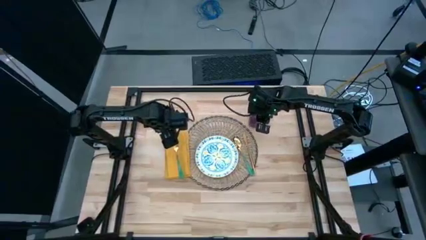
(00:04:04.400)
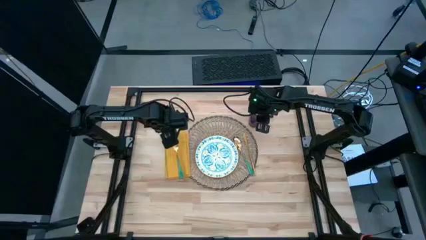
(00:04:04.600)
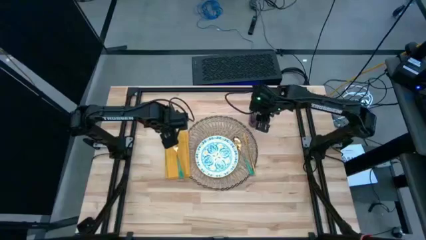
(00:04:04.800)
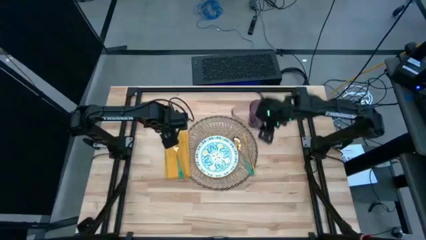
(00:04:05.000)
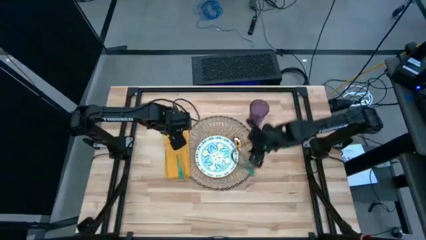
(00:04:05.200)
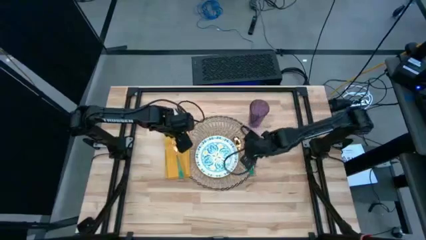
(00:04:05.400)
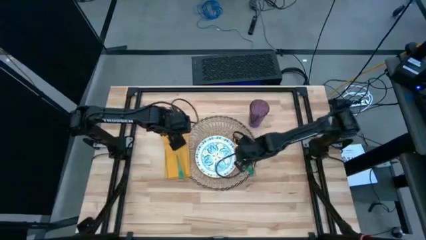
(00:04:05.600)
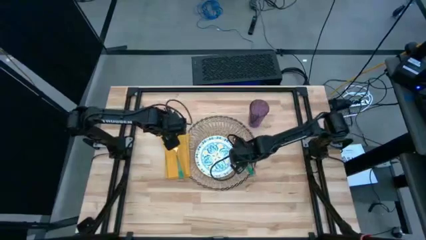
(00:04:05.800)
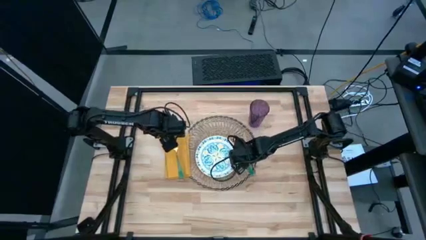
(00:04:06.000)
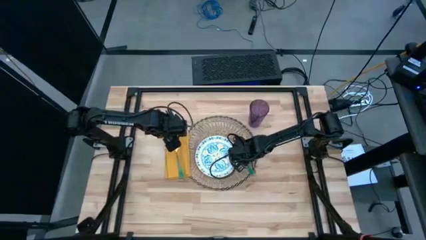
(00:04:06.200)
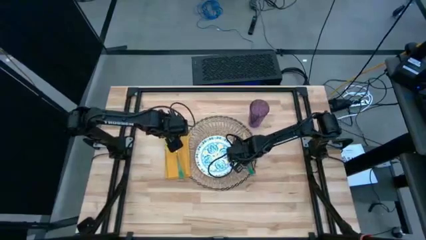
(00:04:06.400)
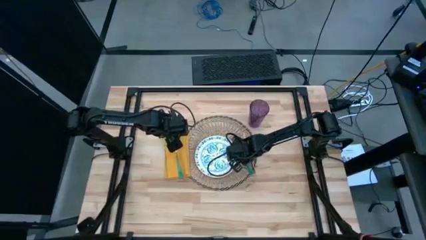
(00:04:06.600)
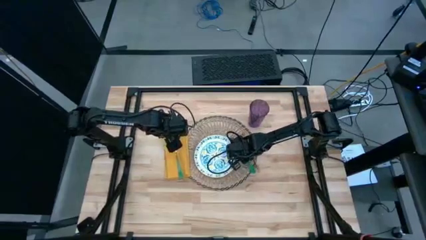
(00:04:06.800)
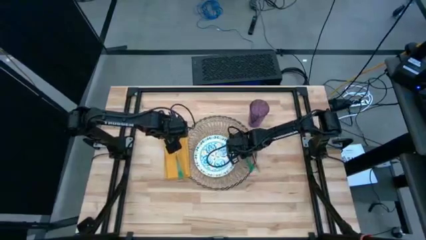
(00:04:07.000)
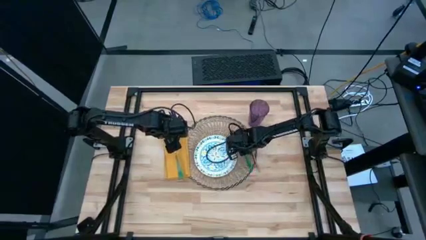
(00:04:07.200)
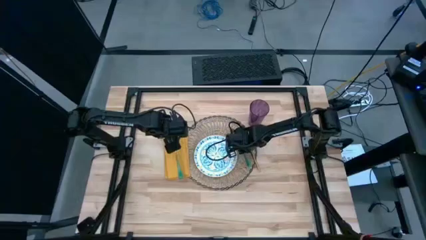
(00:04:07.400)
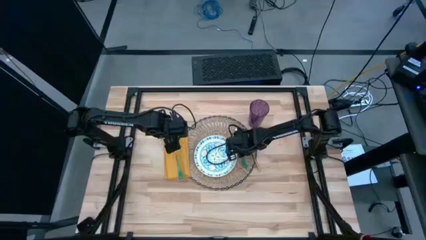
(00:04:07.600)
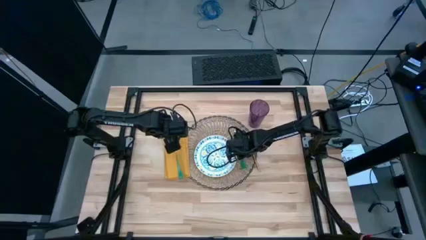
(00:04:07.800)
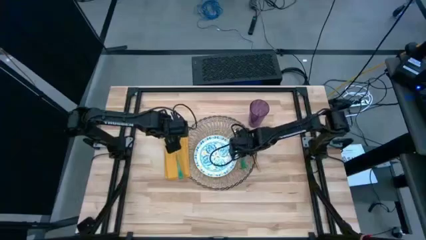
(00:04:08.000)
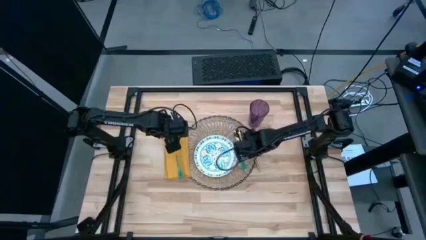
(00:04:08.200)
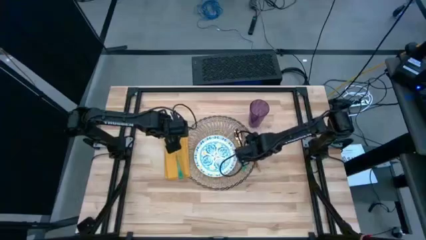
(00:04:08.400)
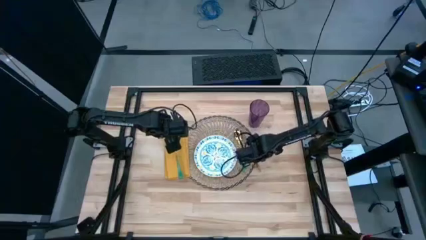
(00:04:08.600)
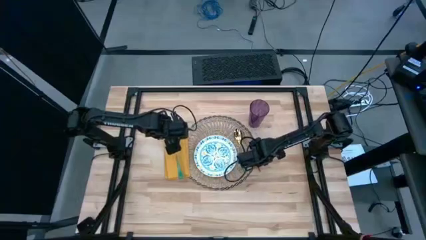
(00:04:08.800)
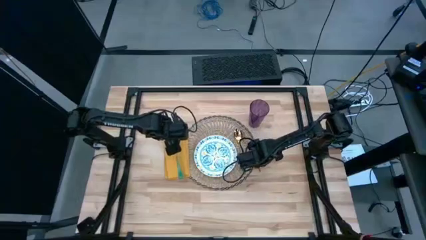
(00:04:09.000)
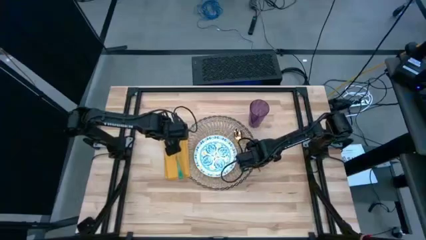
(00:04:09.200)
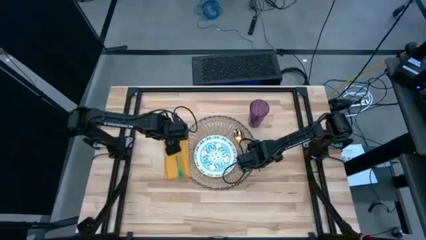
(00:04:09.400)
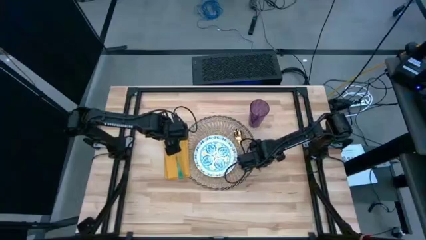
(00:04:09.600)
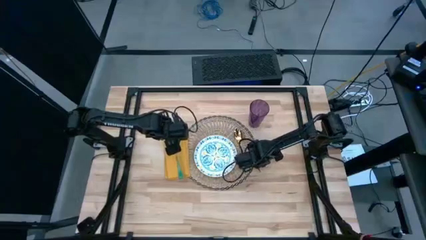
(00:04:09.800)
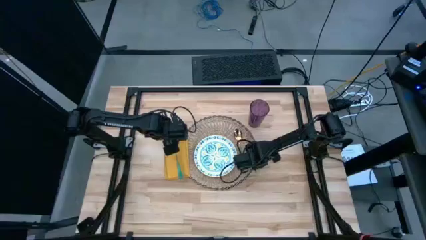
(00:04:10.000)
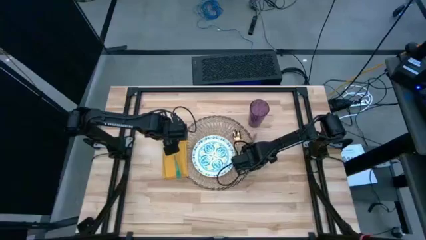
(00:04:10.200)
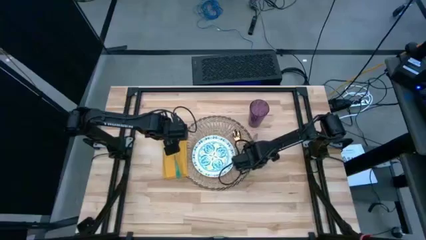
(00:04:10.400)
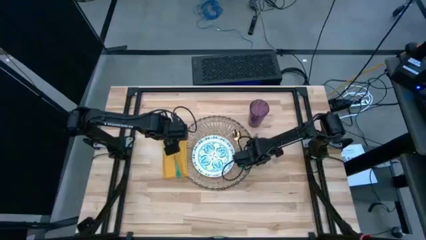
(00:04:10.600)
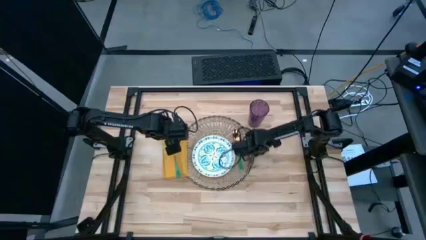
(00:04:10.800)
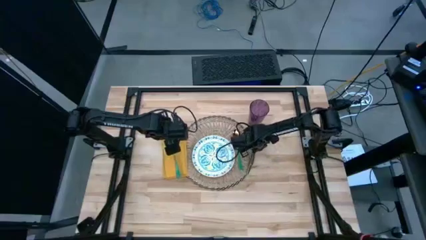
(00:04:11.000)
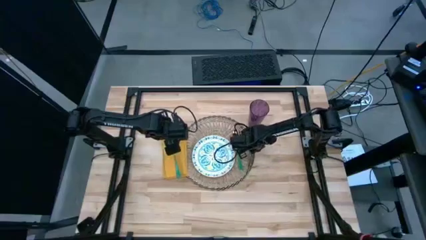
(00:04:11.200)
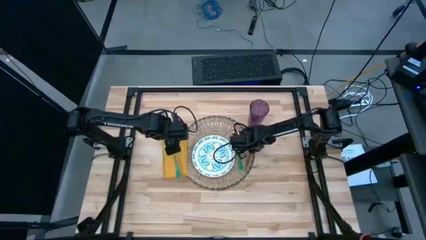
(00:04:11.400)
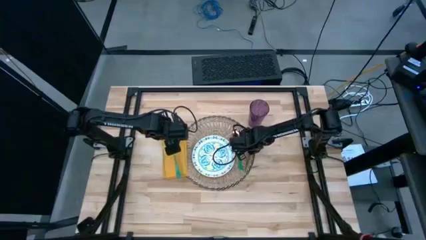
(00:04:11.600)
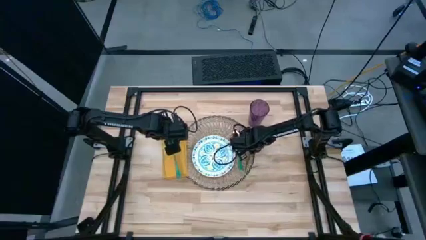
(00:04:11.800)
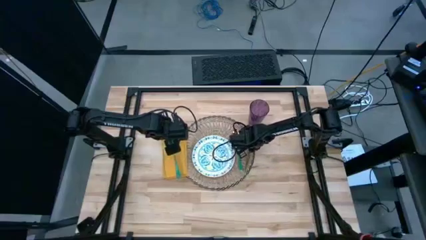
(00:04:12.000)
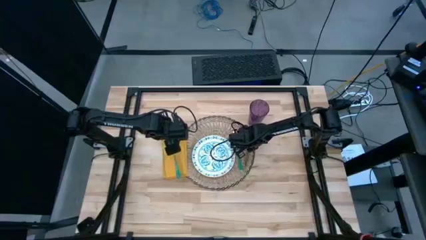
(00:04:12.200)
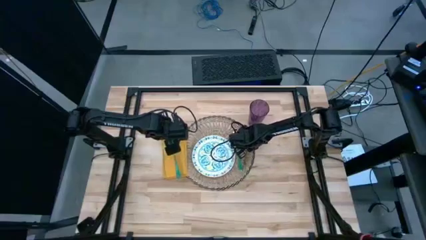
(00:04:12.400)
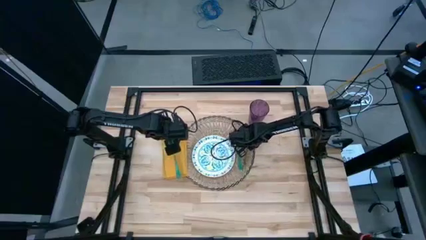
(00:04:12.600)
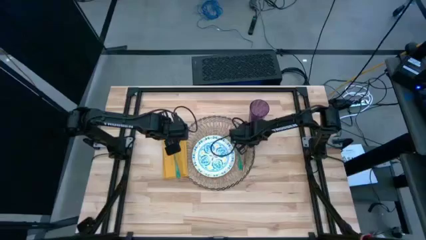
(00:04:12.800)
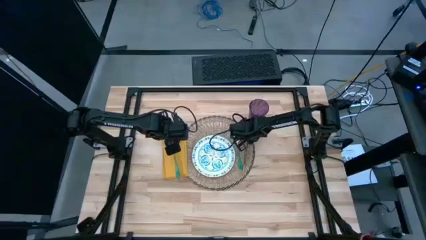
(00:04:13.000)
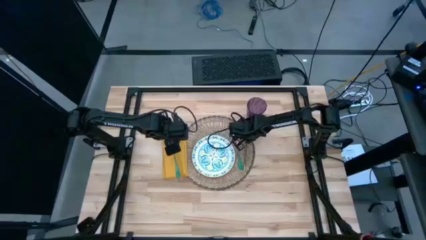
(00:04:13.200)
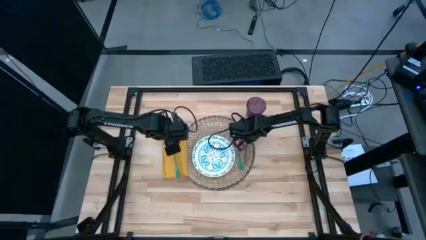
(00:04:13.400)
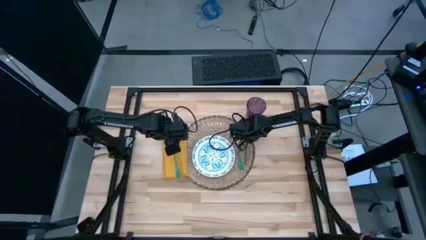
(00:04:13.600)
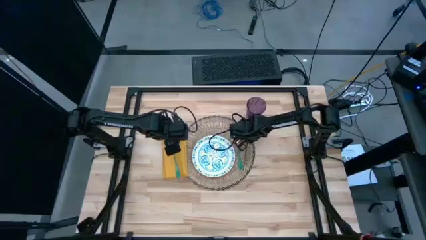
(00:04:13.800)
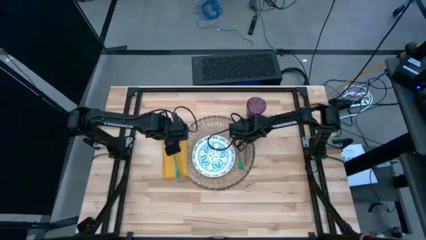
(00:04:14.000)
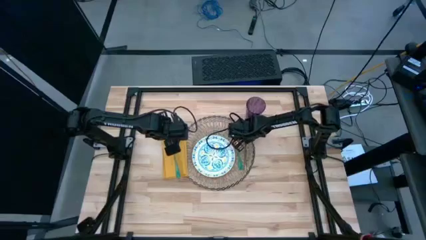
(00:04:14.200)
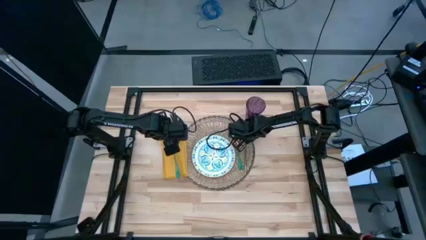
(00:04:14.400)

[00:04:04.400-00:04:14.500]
Task: Set table place
Adjust the green spoon and gold table knife

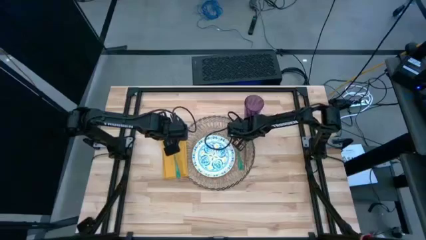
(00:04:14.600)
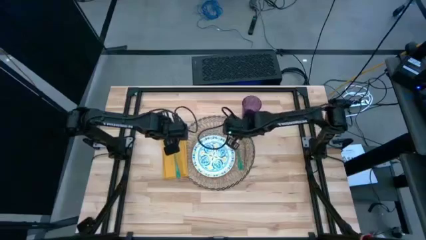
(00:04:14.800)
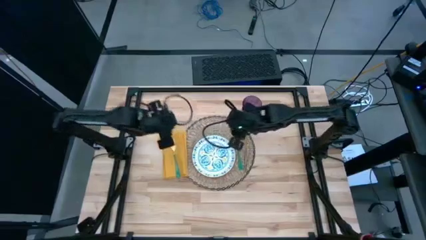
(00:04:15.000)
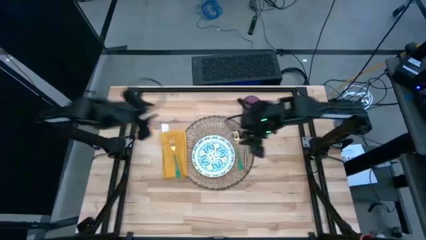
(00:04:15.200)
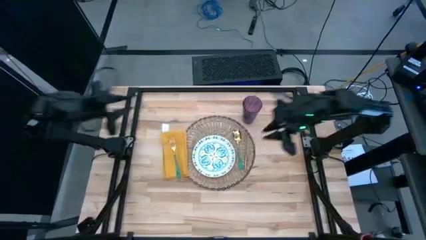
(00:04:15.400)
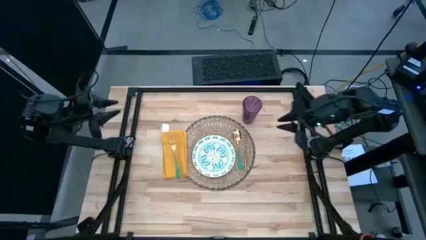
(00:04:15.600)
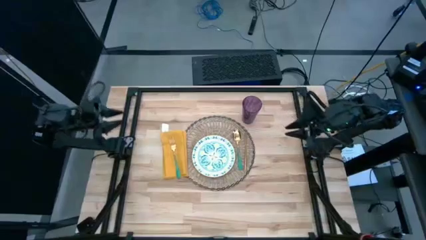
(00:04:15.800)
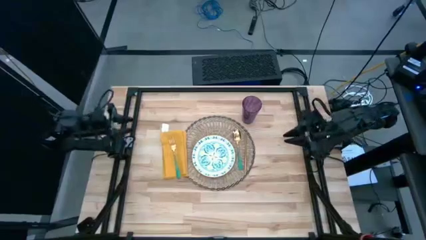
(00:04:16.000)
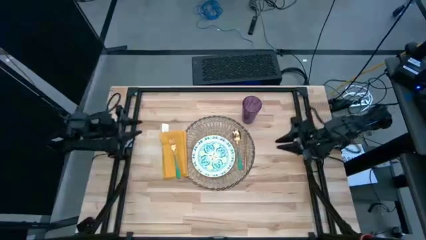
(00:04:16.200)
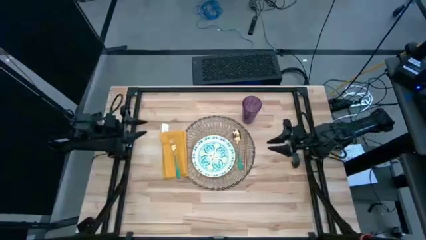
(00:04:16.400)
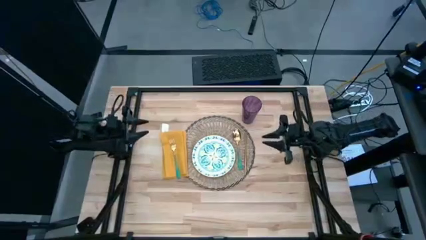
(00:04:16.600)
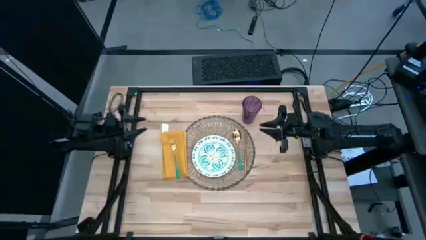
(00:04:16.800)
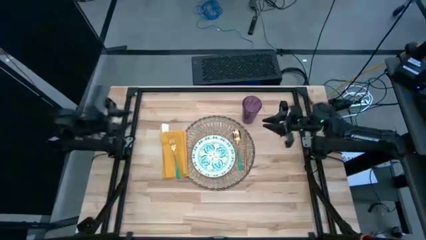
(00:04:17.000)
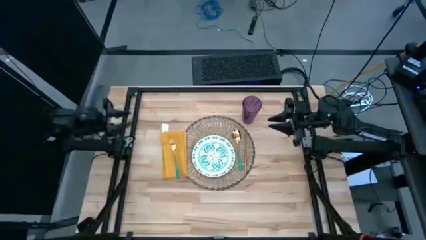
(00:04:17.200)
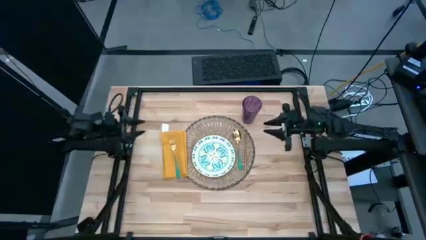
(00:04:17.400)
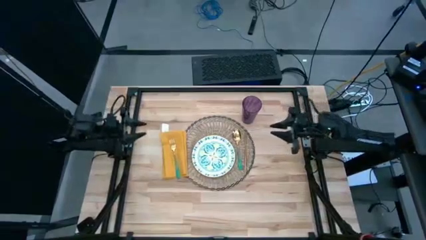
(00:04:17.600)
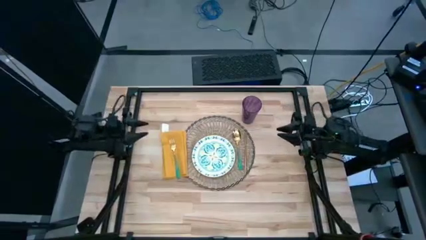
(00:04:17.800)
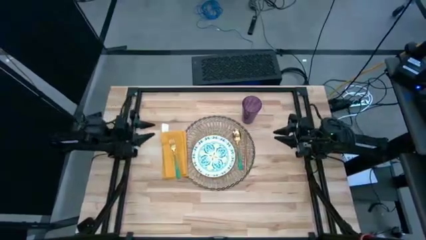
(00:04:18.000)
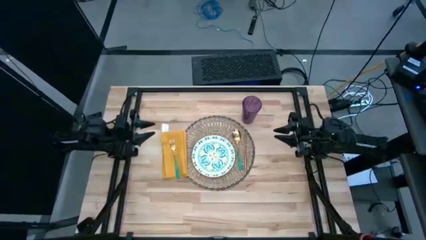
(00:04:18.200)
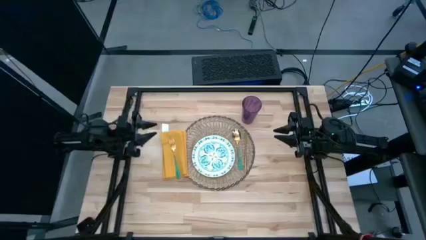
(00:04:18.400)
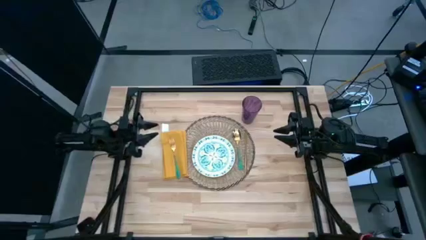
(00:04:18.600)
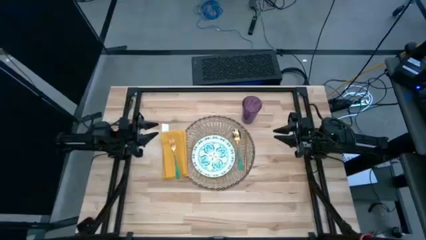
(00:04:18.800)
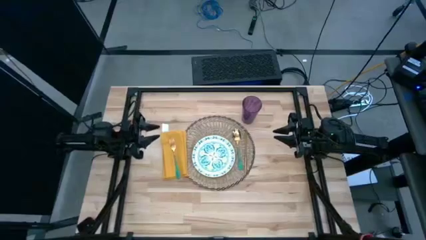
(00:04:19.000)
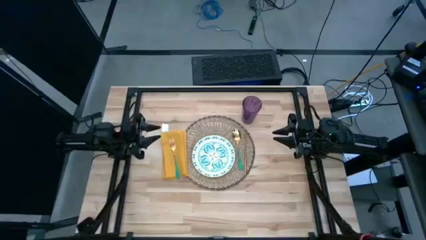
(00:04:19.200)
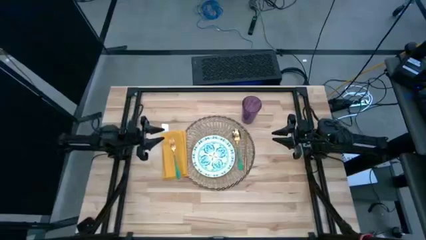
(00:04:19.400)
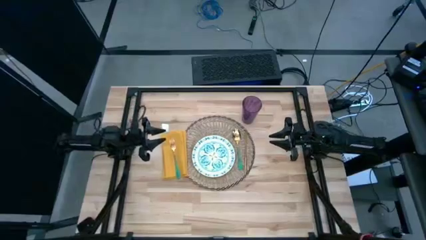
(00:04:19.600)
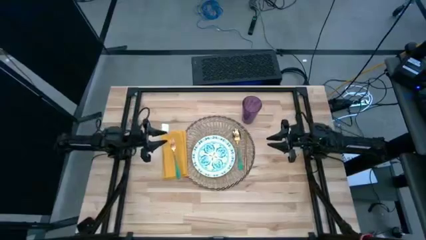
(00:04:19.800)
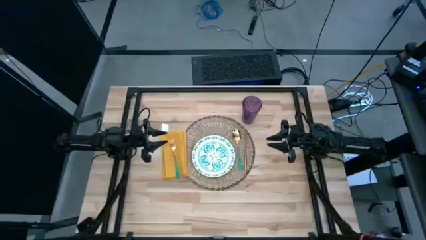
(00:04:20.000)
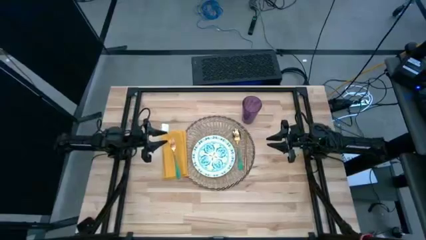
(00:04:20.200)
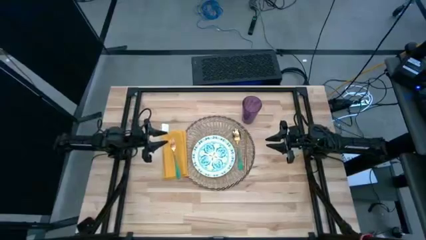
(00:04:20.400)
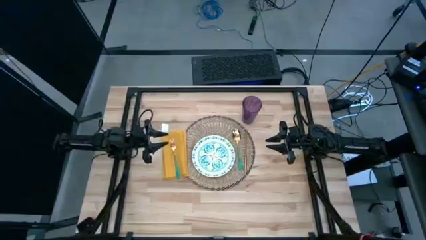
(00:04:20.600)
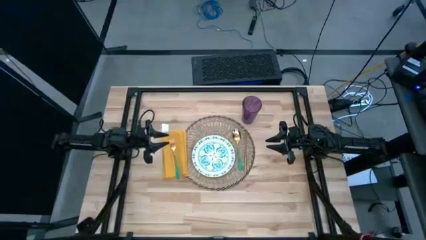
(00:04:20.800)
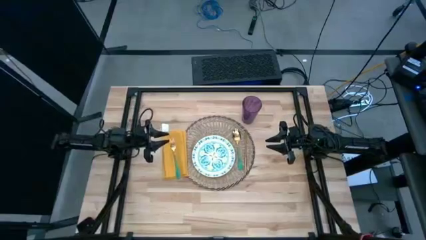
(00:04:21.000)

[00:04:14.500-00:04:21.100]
Return to Home Position
